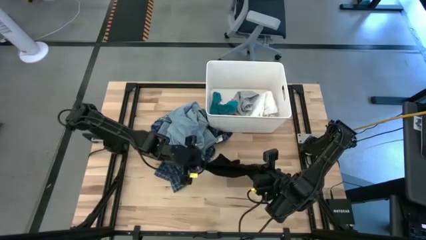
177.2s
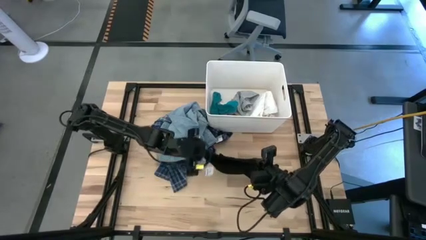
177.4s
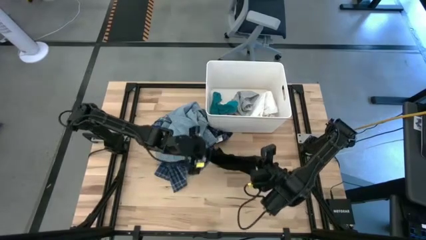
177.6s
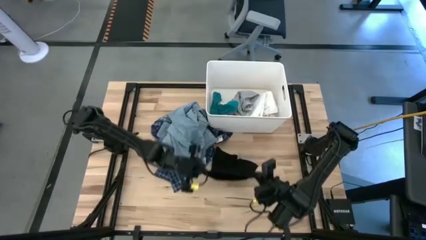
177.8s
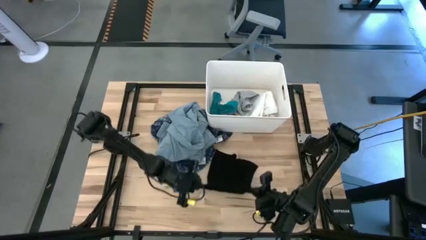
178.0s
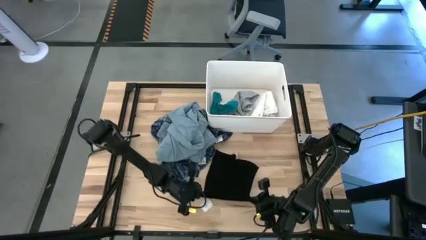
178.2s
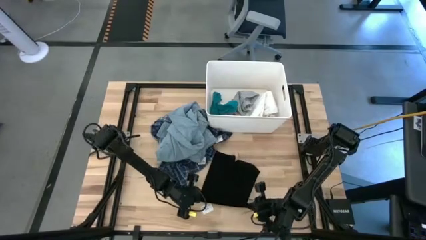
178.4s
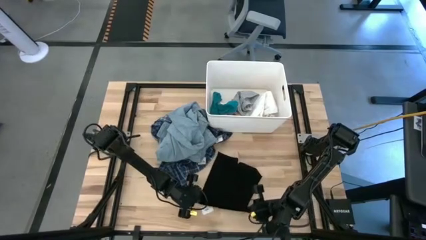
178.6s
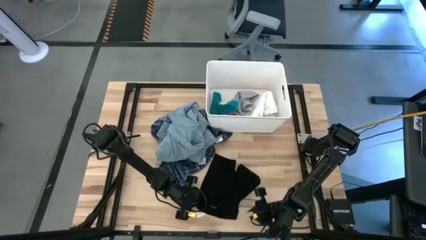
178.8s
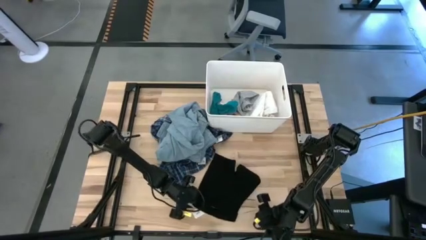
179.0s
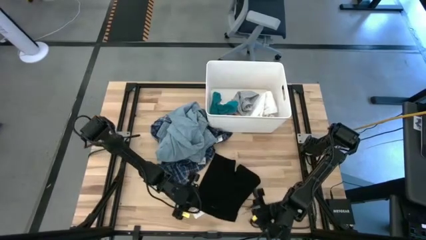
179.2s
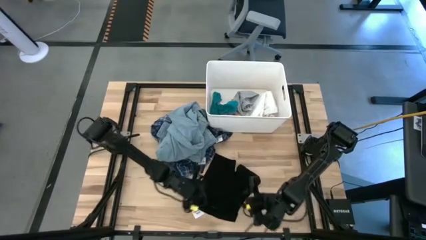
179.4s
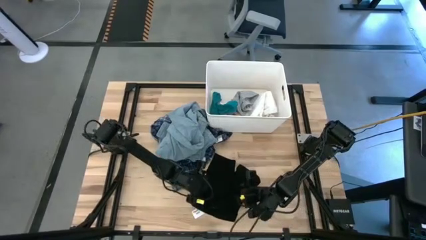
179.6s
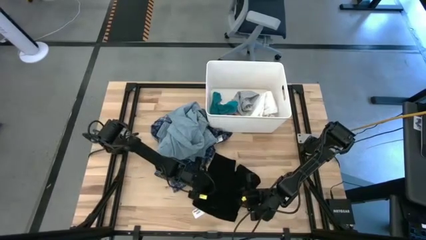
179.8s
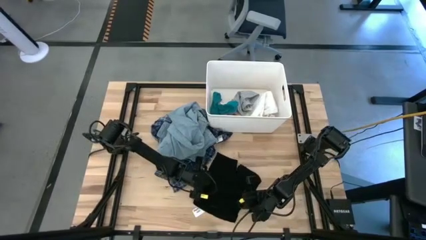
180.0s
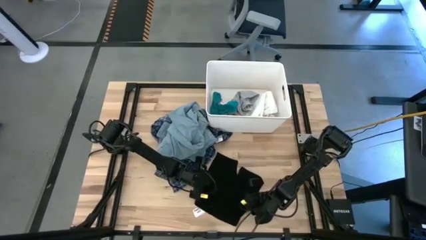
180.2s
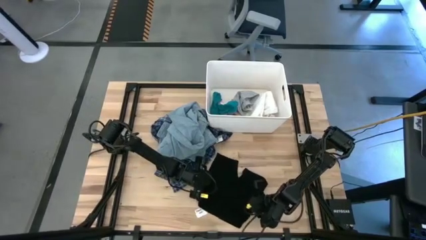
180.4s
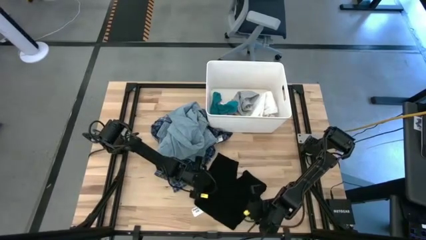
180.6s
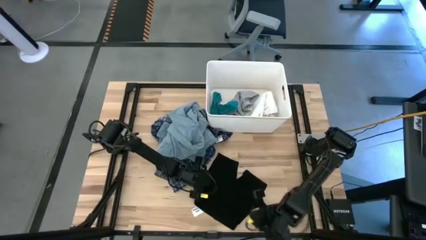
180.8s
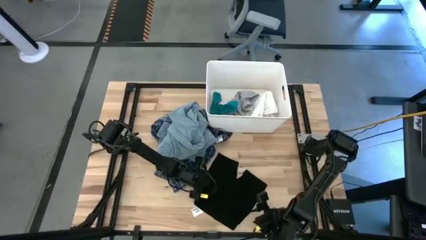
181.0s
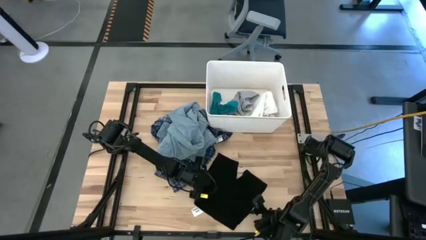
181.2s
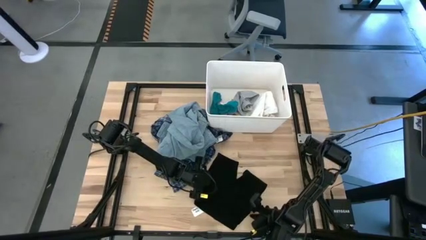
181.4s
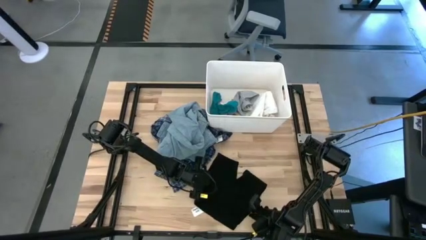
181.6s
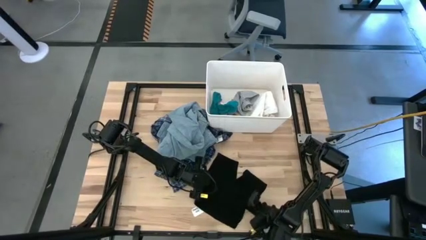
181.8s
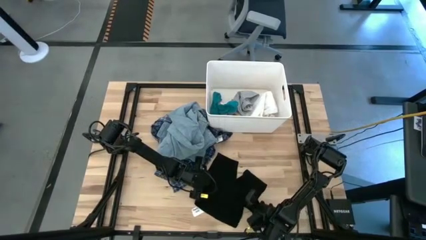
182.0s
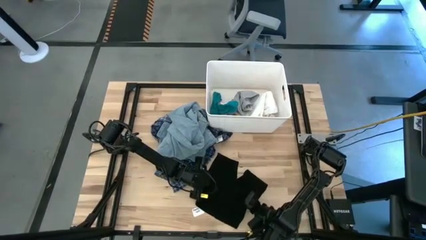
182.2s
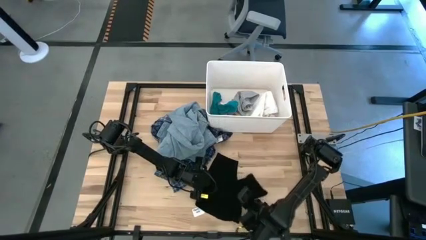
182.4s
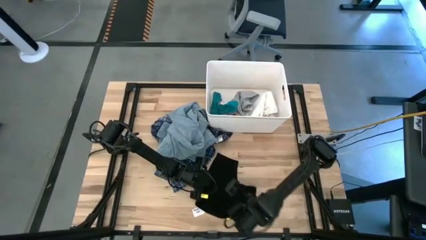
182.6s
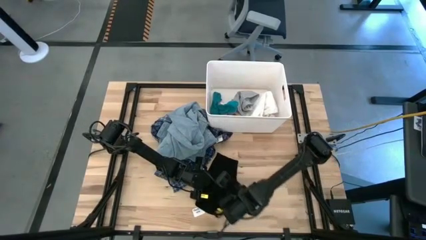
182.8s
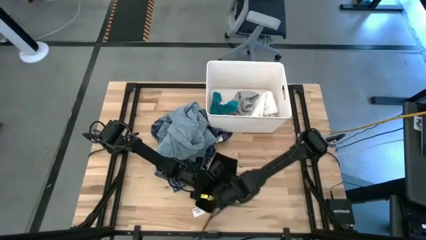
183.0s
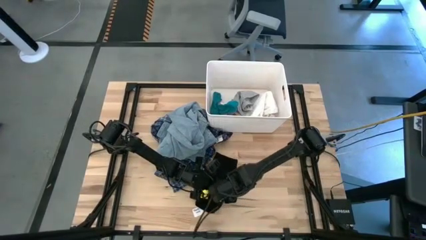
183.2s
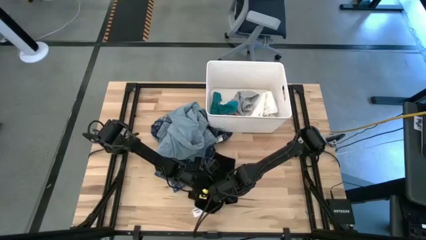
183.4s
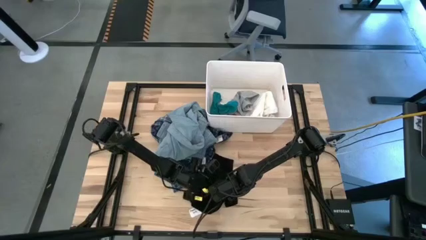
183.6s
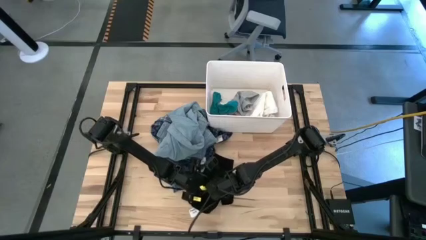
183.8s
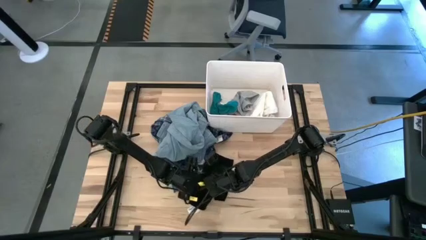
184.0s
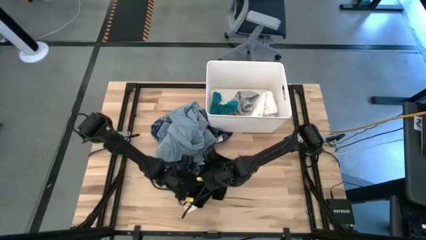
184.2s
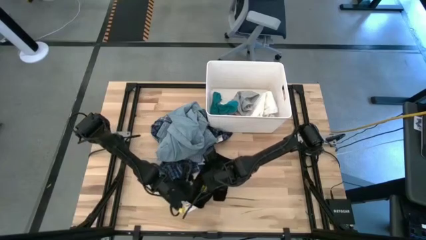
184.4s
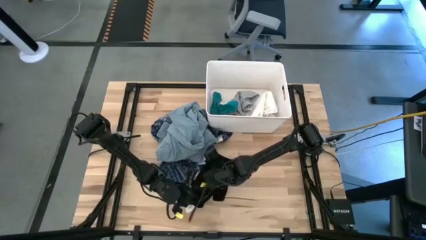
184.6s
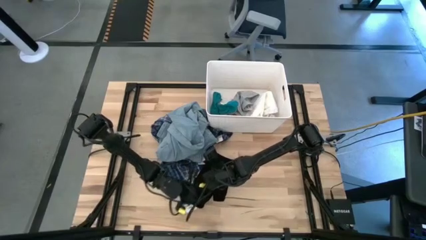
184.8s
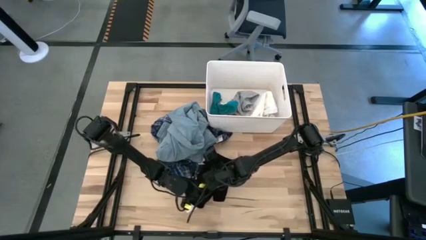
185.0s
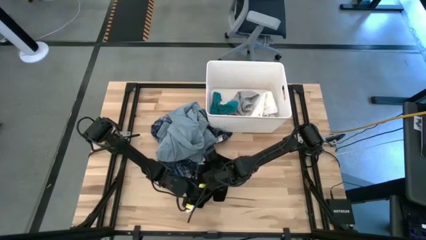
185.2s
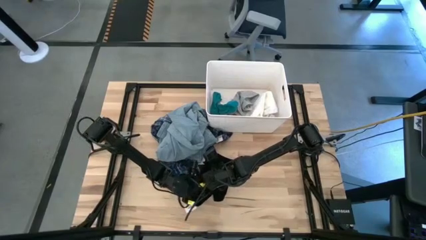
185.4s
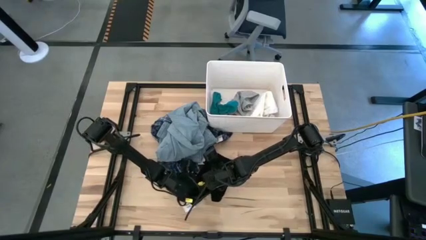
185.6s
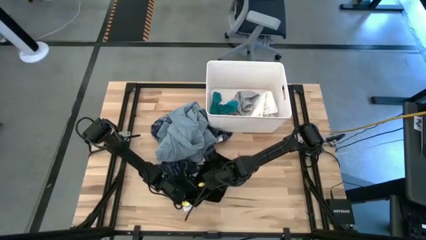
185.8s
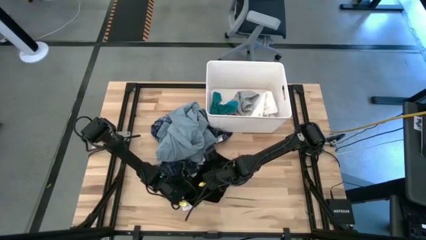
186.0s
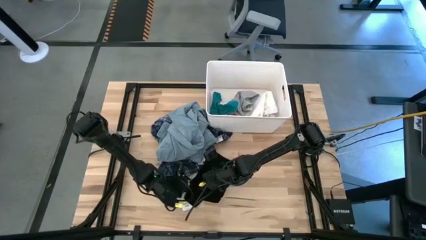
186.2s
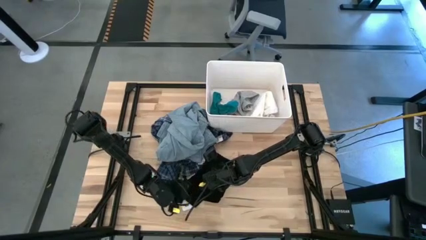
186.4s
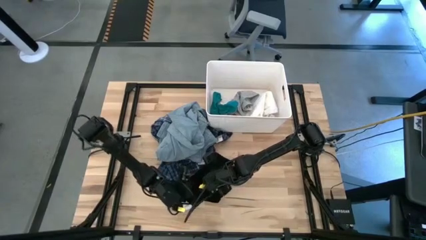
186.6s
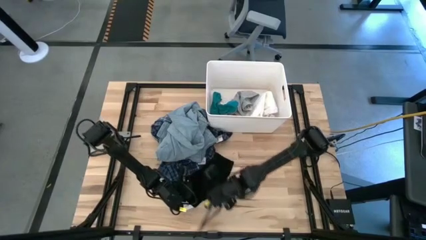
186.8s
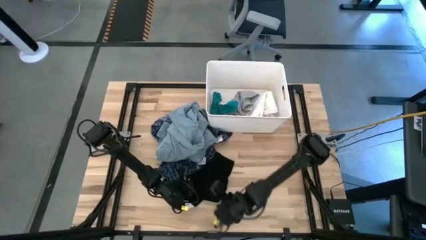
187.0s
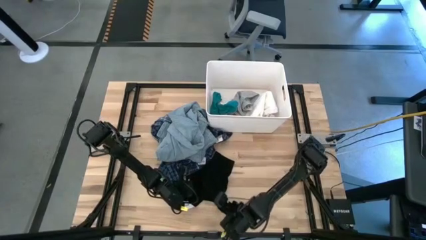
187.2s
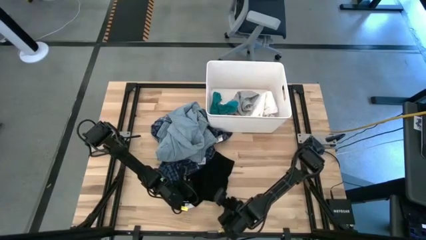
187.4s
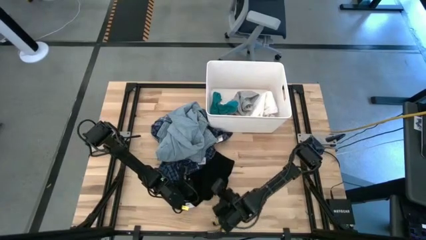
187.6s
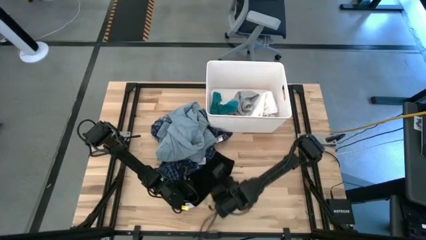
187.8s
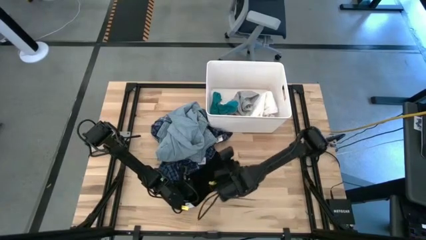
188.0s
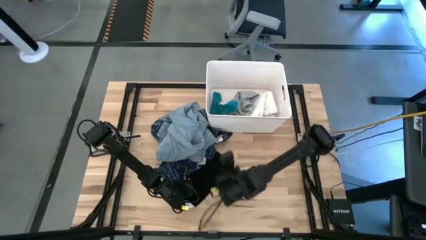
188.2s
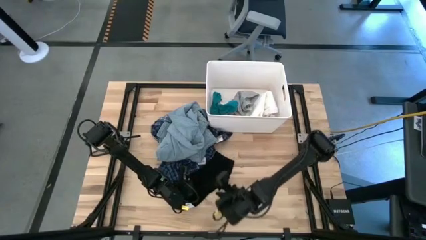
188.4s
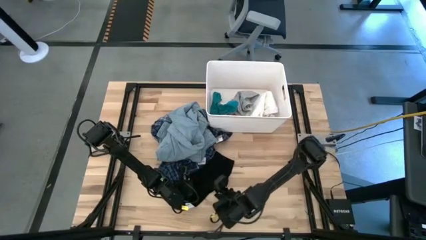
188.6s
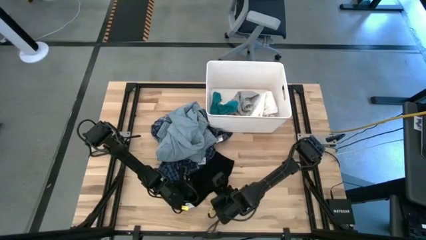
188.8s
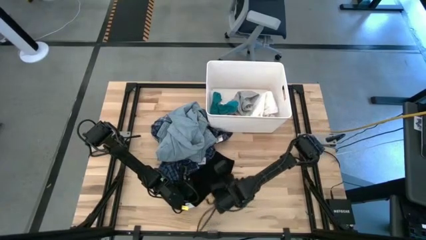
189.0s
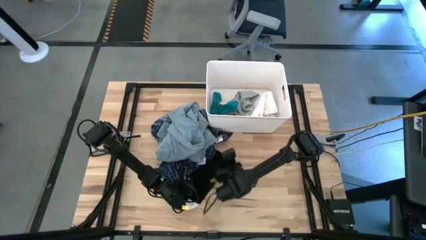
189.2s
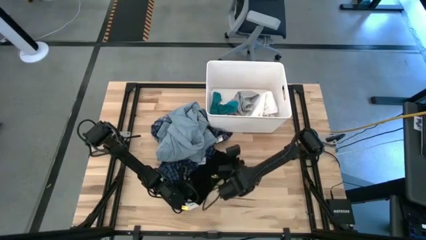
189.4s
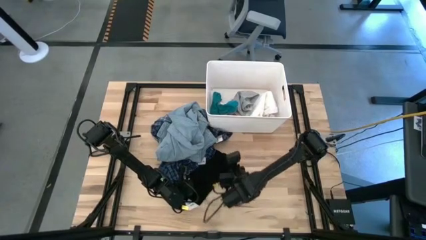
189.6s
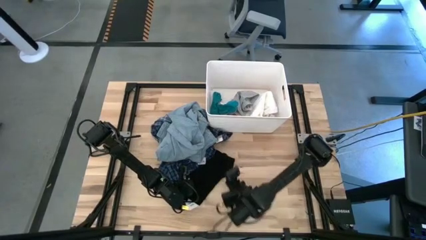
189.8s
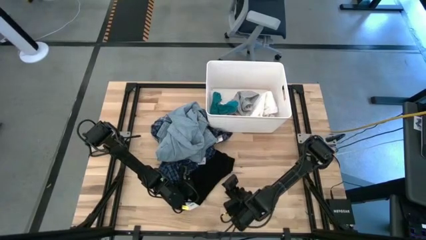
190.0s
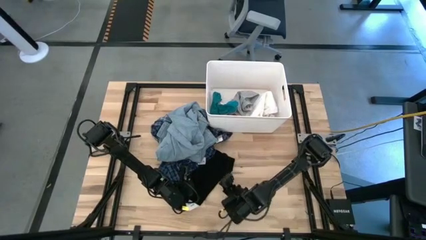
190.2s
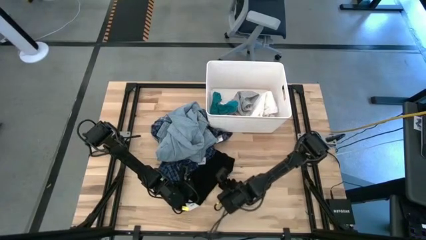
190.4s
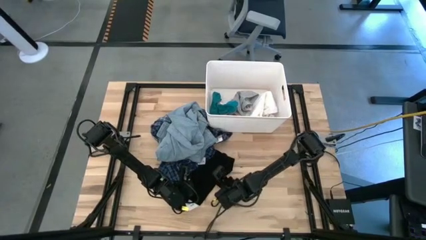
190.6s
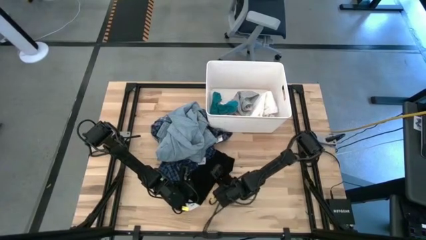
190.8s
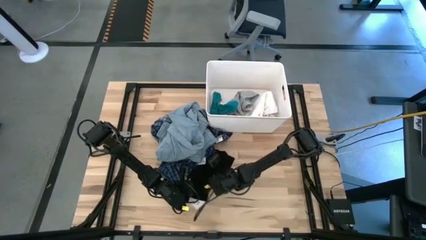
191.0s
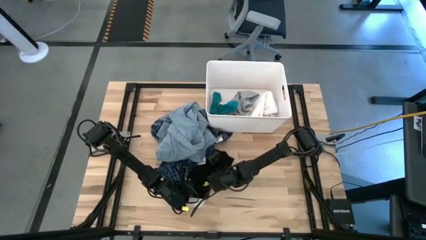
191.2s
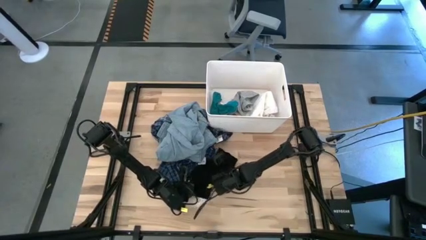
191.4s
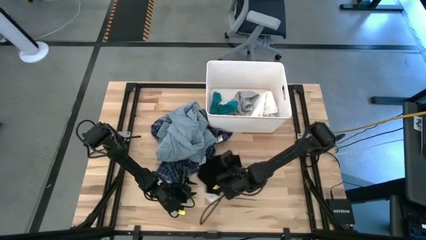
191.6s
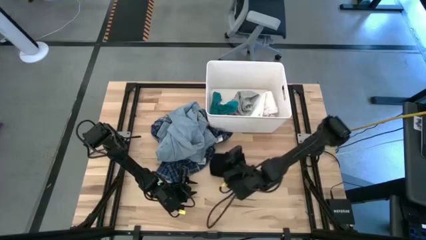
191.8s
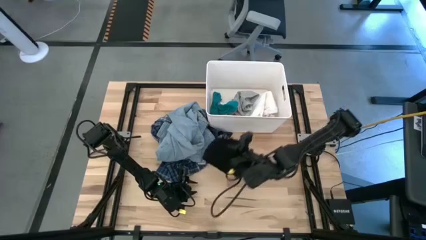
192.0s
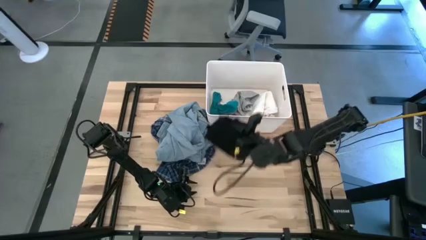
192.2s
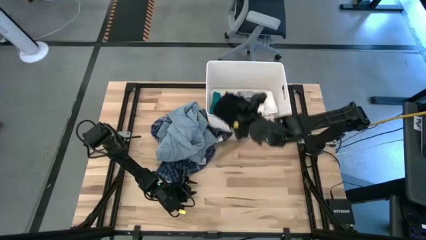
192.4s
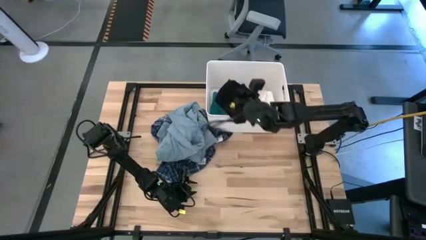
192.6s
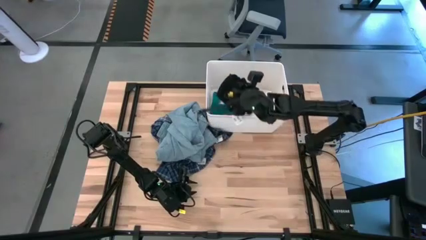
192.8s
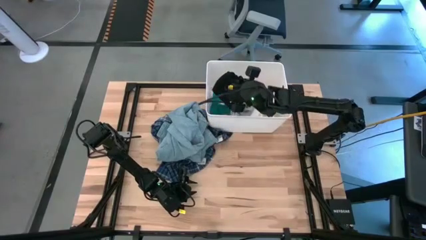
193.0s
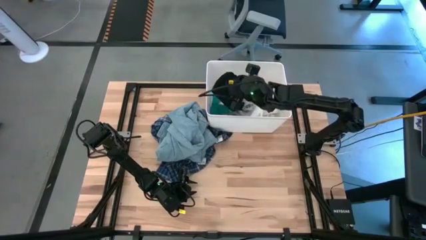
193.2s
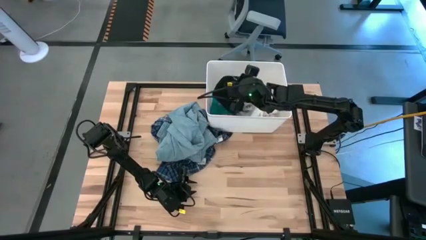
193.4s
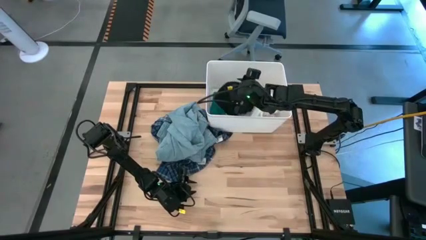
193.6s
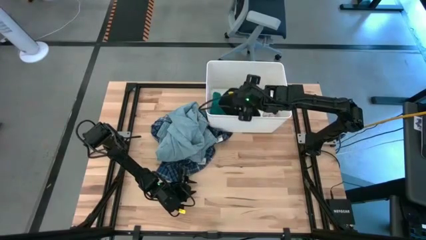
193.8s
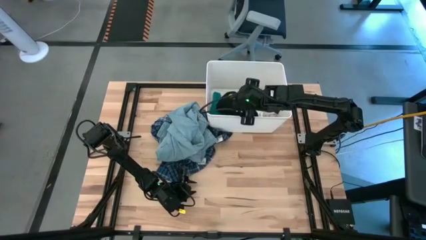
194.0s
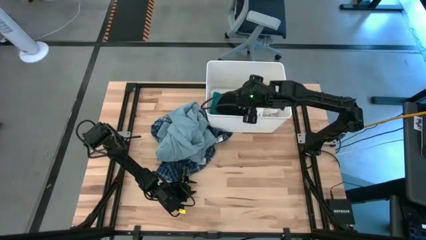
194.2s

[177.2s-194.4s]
Task: Sort clothes
Put the black boxer into the white laundry bin
